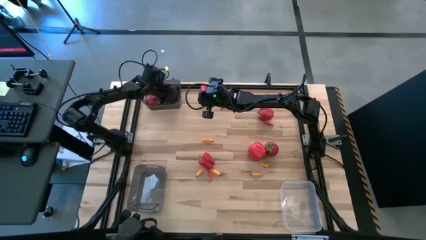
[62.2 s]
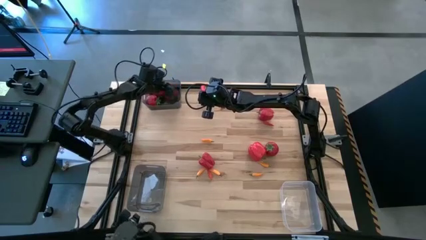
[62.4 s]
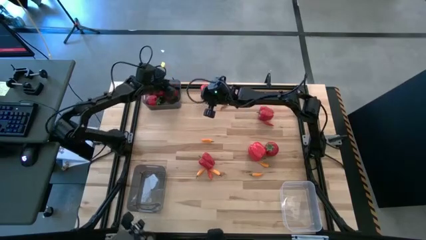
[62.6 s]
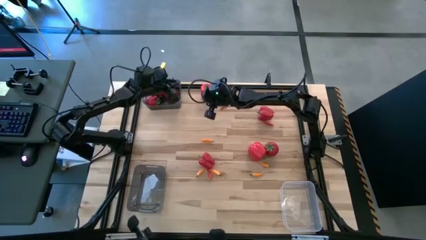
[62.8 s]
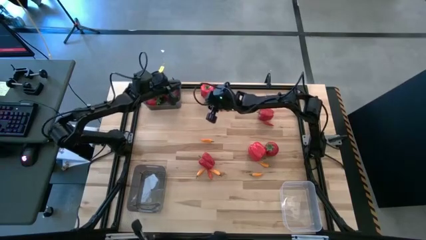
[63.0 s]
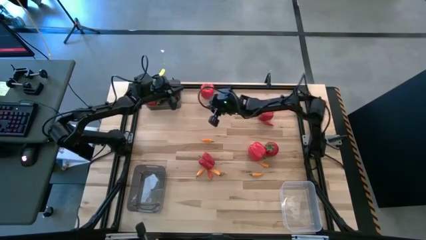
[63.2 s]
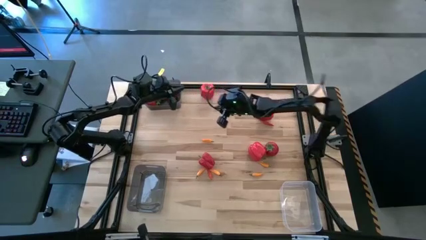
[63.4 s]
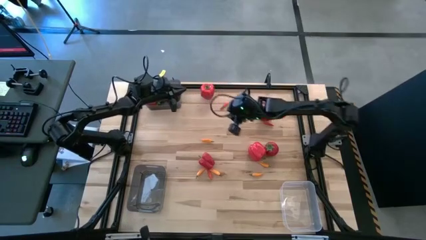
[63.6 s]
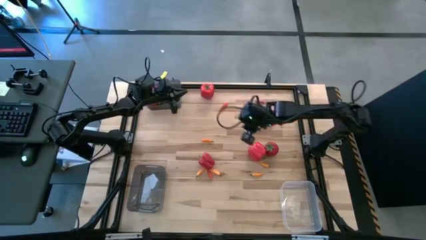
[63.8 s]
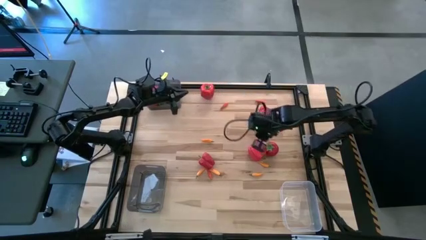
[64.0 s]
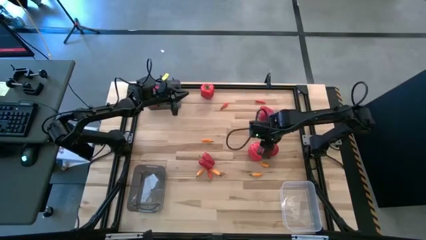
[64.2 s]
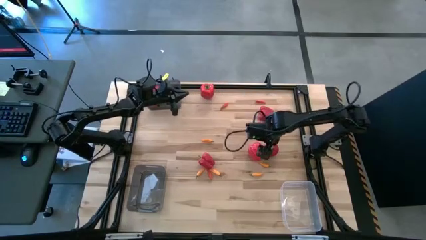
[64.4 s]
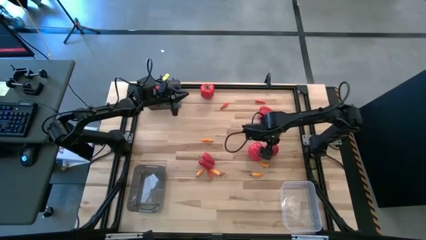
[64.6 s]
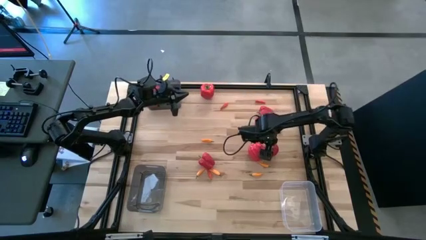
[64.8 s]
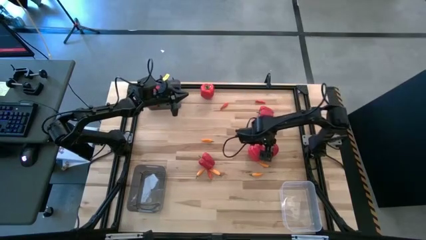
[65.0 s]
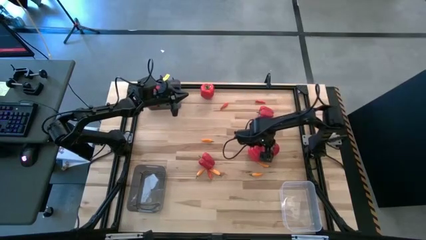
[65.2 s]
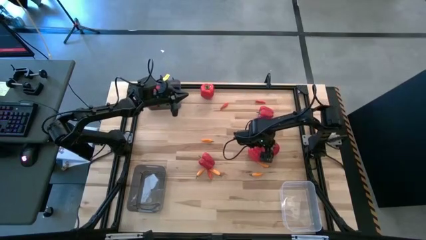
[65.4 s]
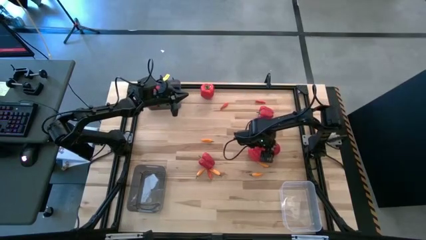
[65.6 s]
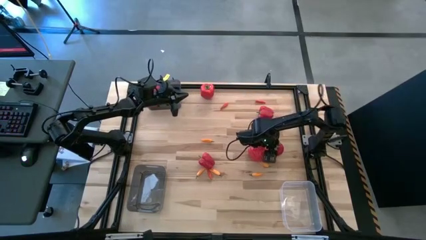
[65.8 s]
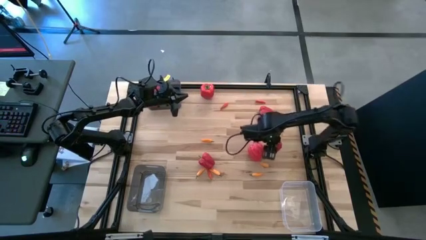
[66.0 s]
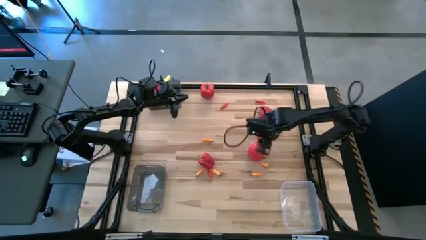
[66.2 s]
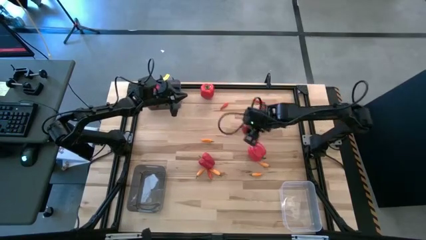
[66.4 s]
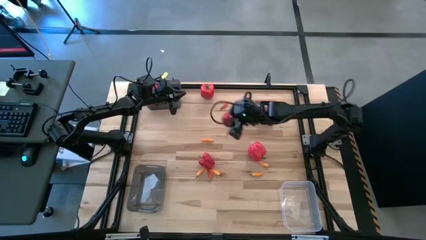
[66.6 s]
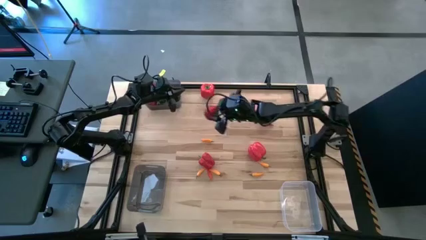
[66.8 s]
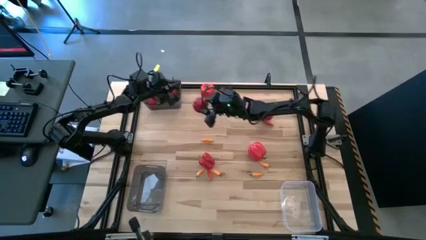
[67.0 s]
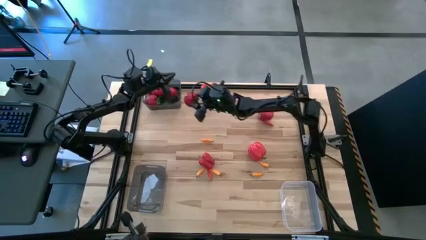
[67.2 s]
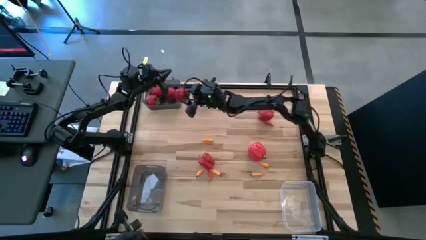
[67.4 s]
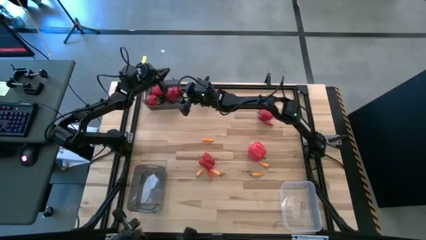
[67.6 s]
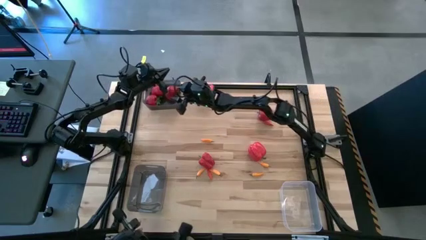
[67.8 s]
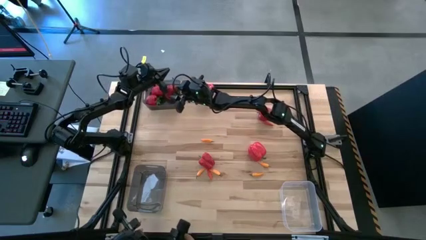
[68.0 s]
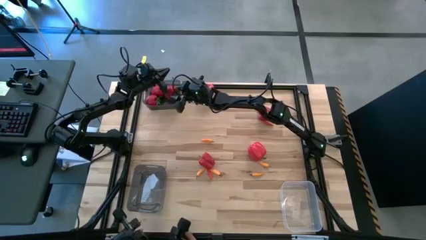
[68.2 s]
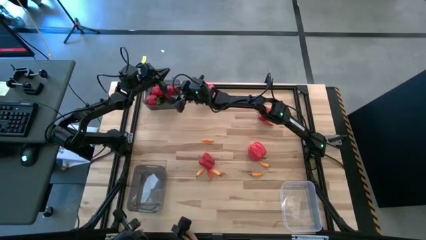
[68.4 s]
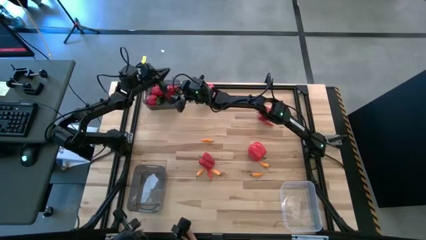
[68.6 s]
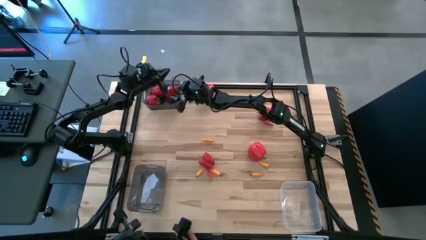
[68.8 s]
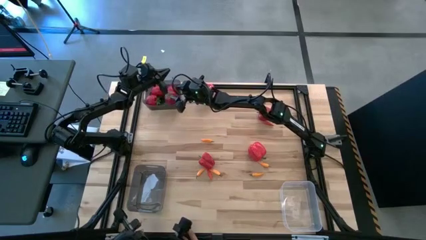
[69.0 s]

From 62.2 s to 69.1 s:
Task: Sort produce into baskets
Put the red tomato into the top black bin

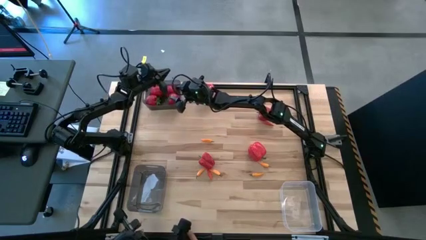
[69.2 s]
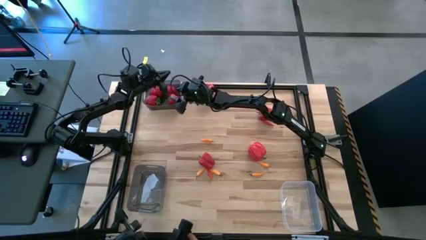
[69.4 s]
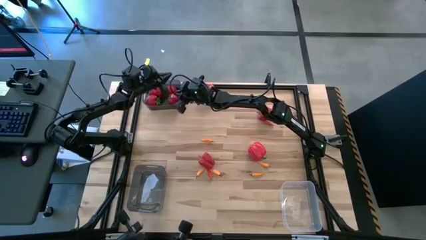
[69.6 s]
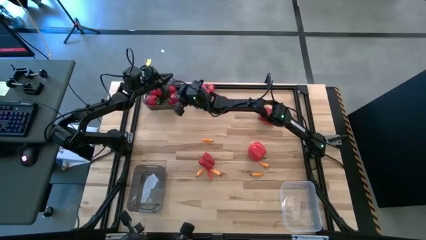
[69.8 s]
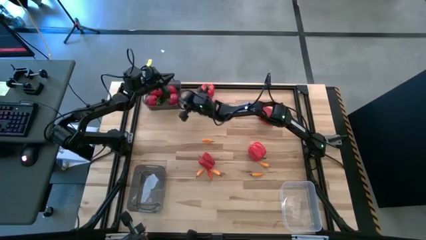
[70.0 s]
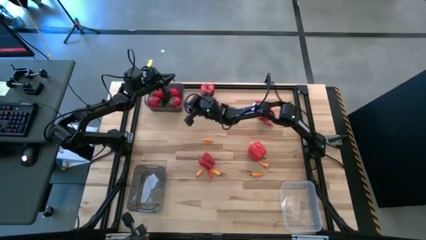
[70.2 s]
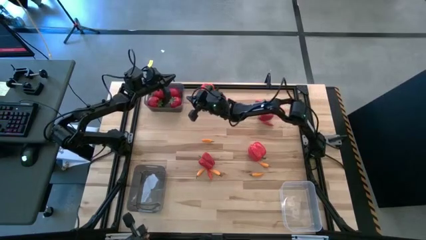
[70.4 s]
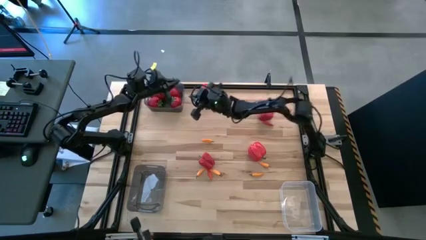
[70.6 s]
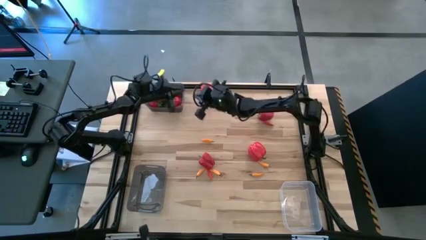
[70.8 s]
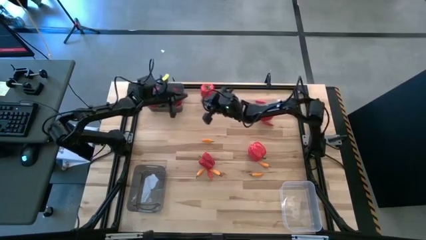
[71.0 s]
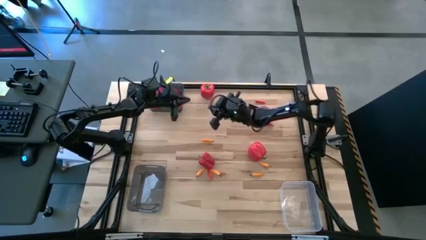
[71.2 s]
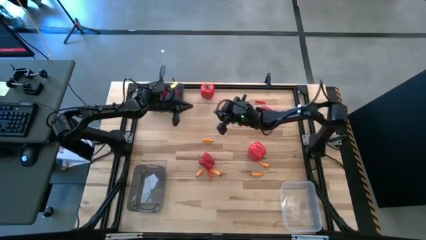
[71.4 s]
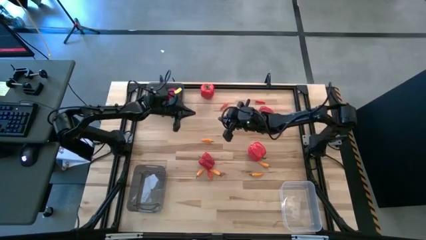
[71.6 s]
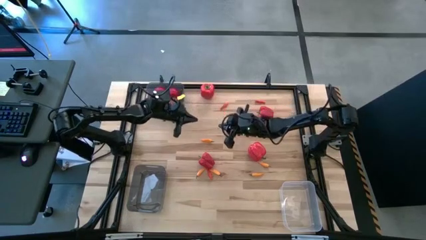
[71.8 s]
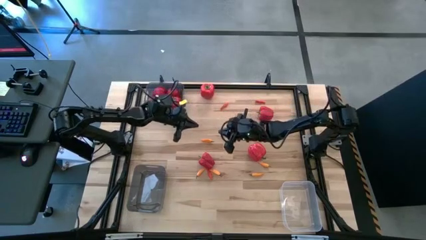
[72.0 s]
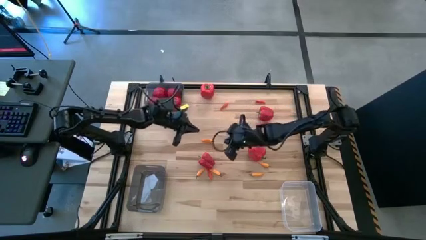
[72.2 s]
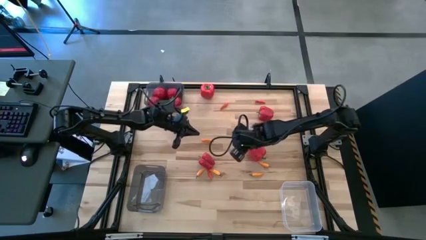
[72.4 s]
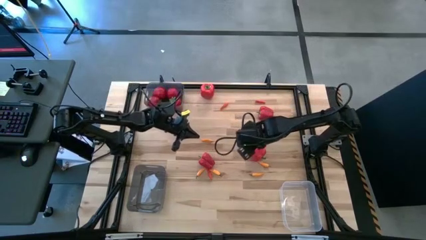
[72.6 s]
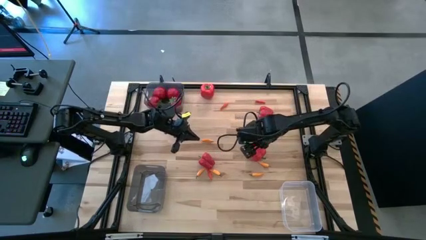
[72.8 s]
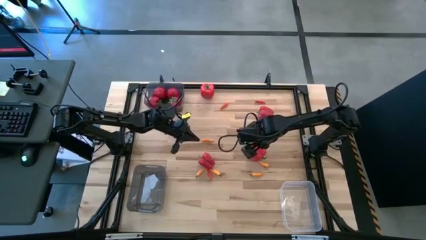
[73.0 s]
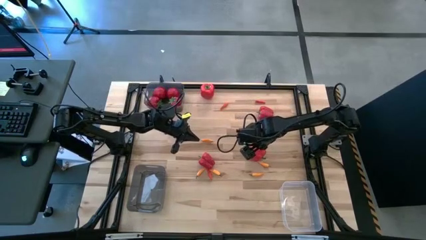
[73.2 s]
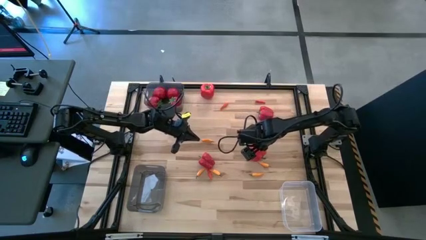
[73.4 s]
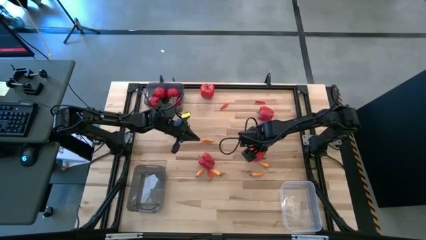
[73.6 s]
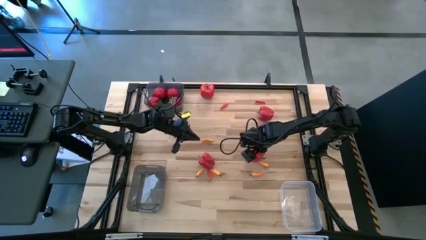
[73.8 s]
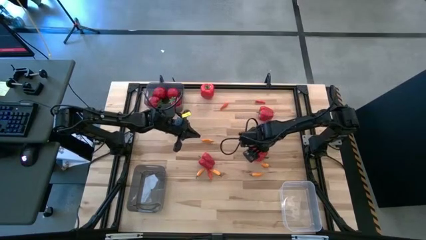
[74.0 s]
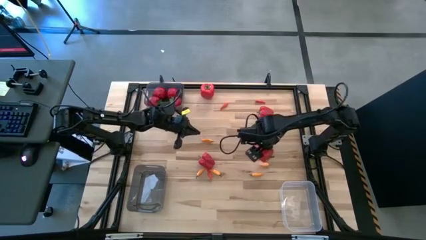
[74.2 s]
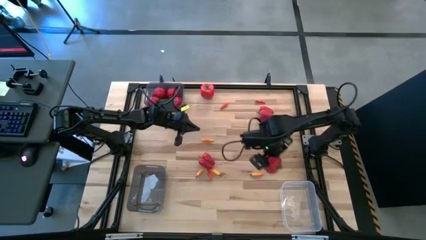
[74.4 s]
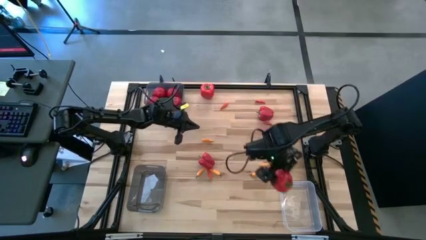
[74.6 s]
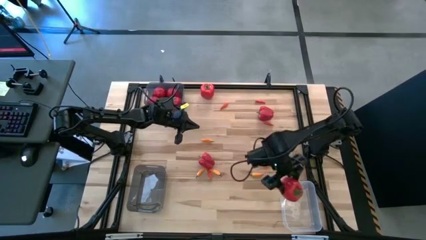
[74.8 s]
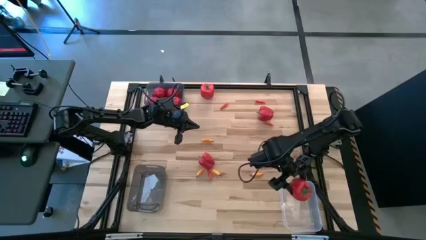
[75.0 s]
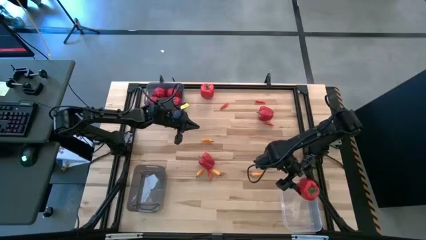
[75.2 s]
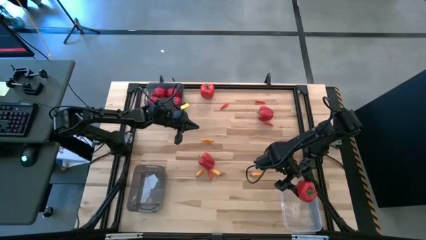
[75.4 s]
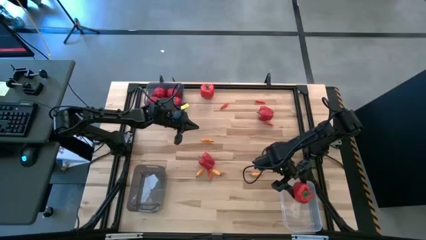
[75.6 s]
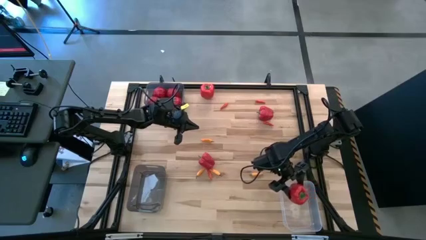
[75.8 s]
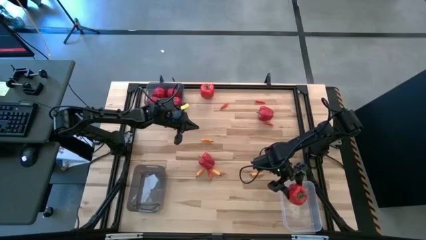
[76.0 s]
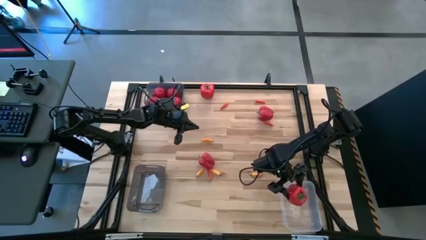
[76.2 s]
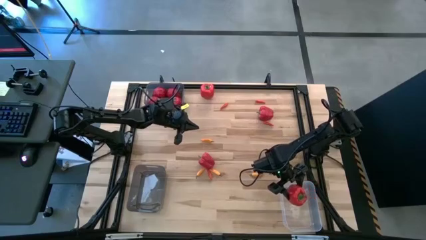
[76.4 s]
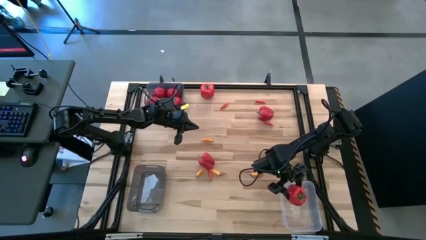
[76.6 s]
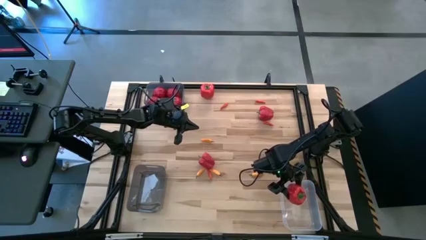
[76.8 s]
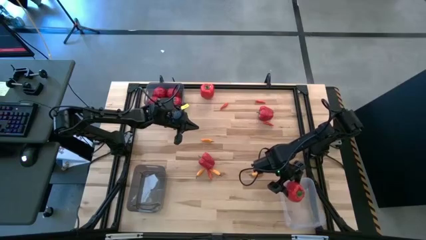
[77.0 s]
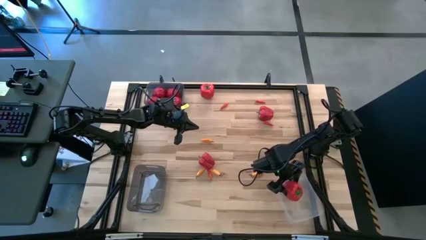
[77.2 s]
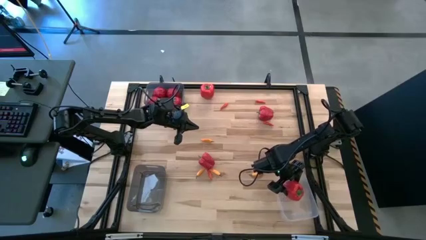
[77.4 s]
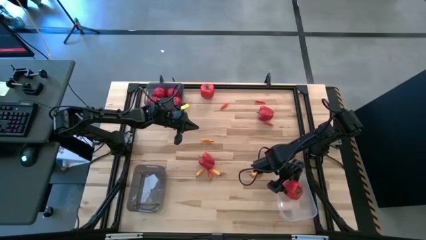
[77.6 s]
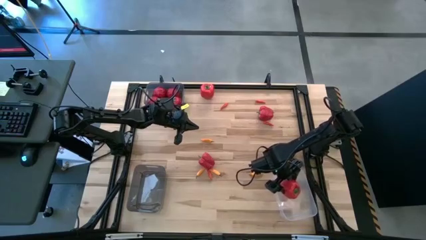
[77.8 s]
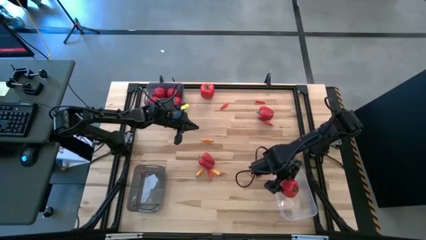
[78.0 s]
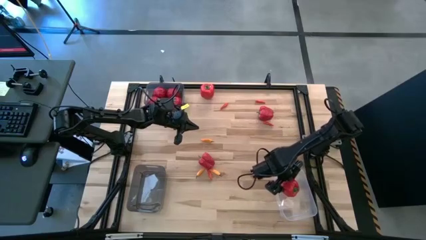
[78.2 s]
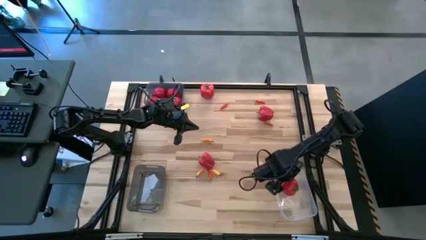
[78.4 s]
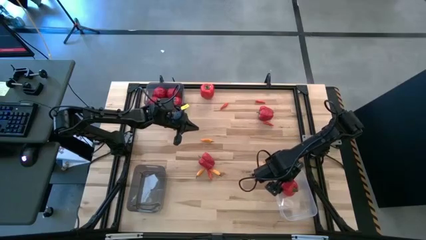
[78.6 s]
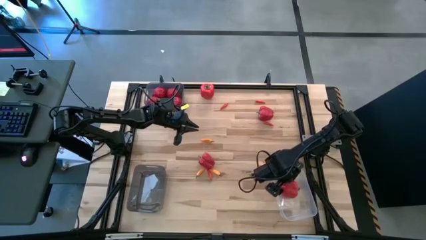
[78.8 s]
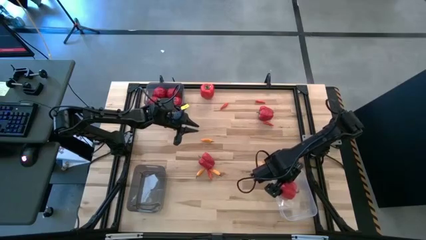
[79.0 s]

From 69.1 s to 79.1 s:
Put the red bell pepper into the transparent bin

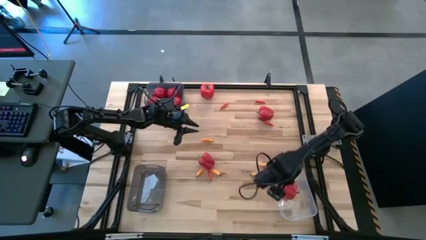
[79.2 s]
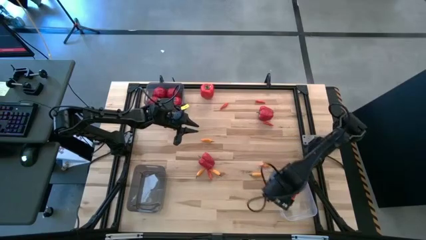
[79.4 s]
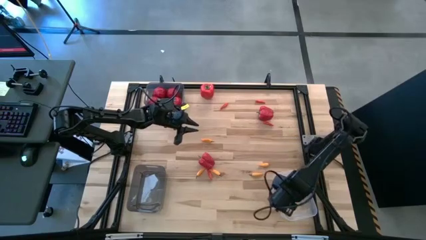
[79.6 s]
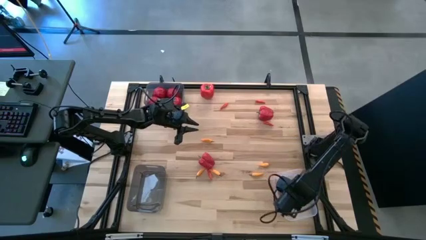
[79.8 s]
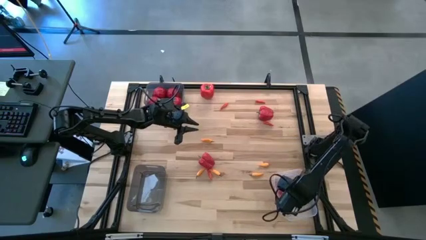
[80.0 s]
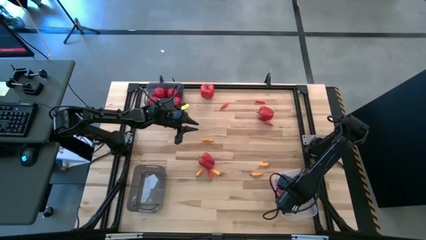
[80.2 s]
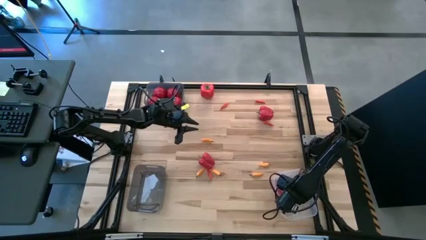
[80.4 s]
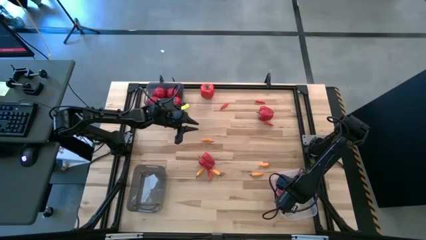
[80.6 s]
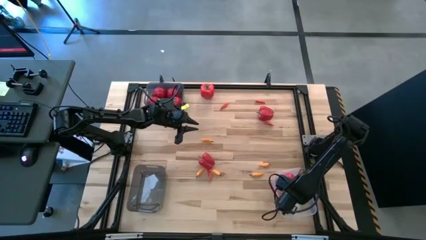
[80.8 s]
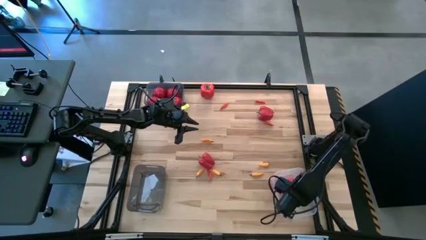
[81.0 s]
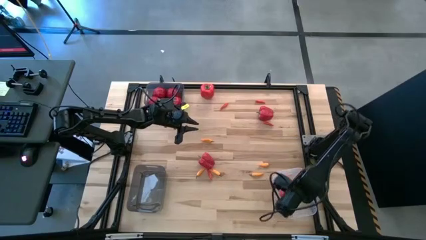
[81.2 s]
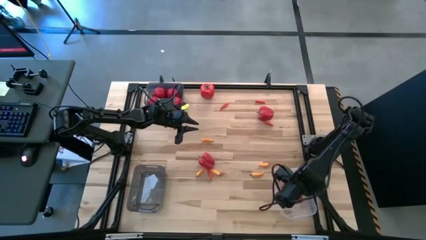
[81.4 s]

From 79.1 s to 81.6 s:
Adjust the red bell pepper in the transparent bin
